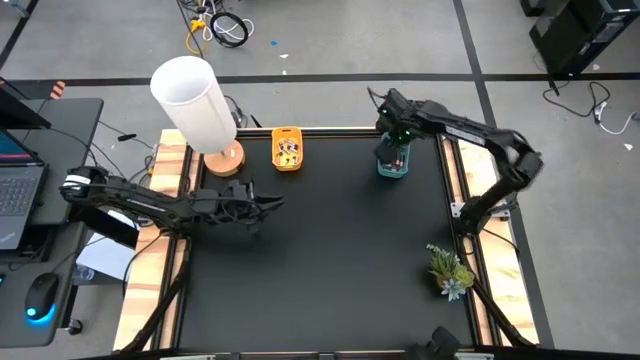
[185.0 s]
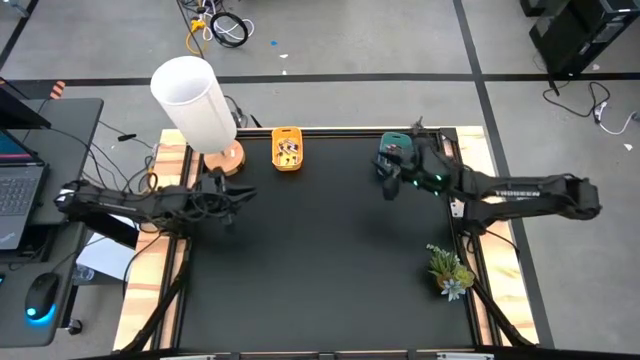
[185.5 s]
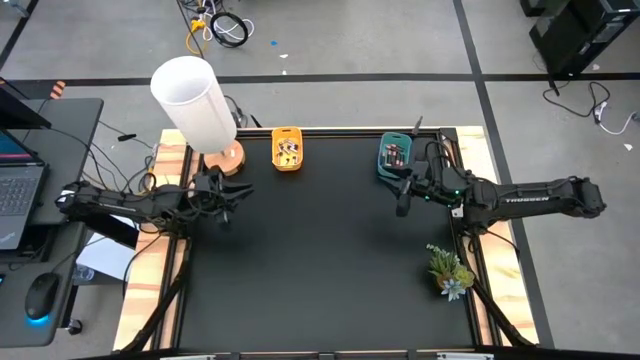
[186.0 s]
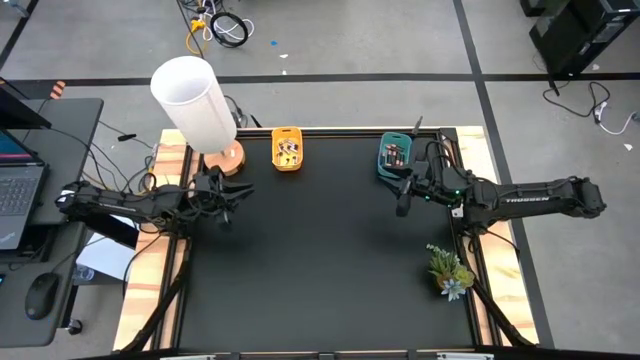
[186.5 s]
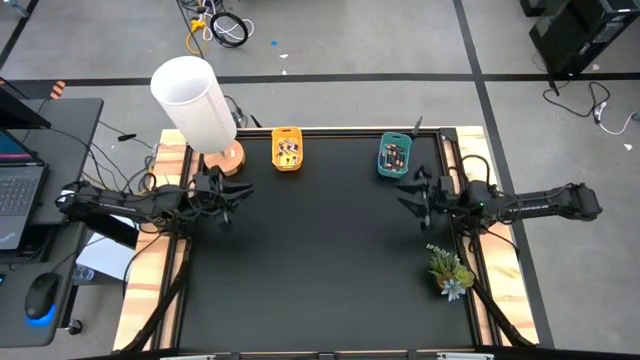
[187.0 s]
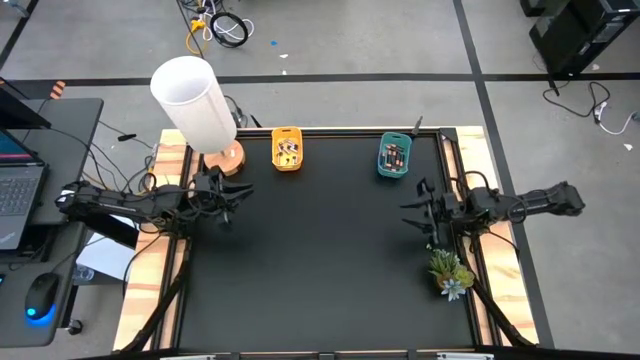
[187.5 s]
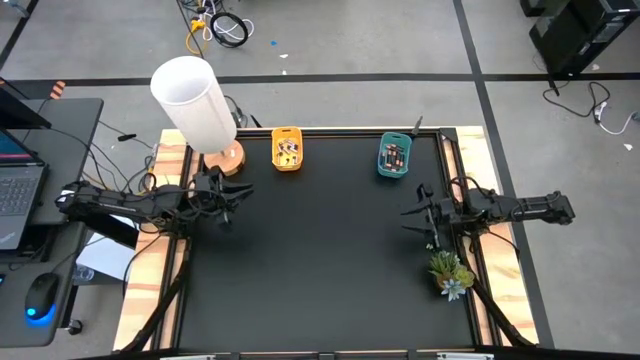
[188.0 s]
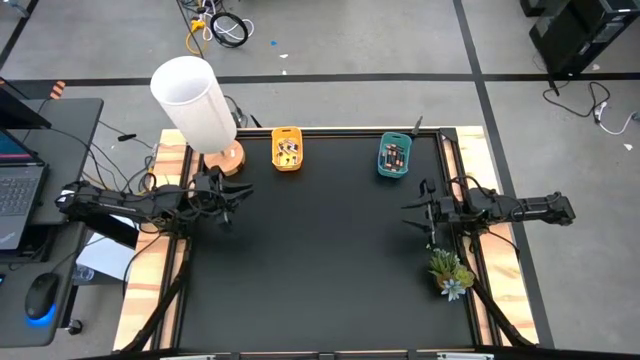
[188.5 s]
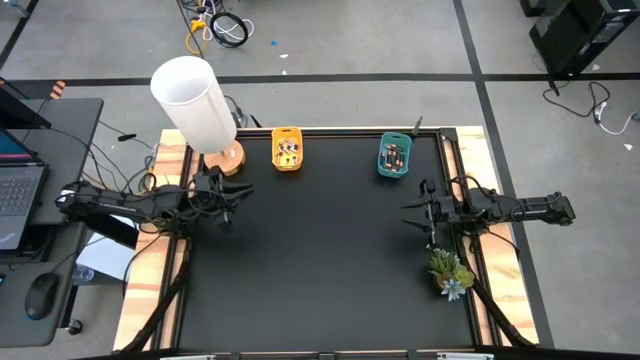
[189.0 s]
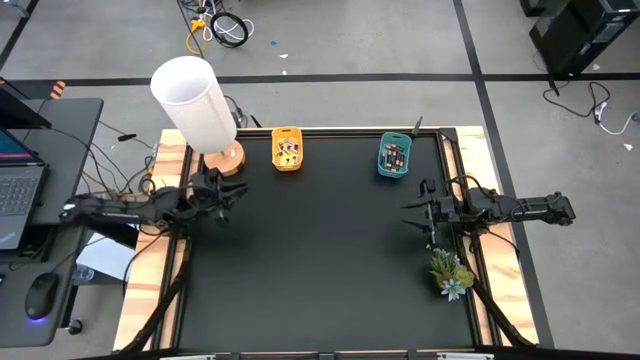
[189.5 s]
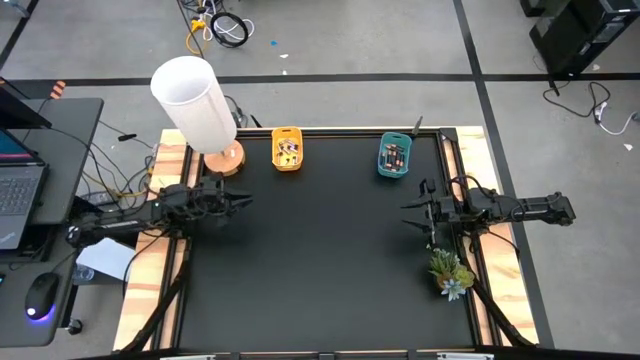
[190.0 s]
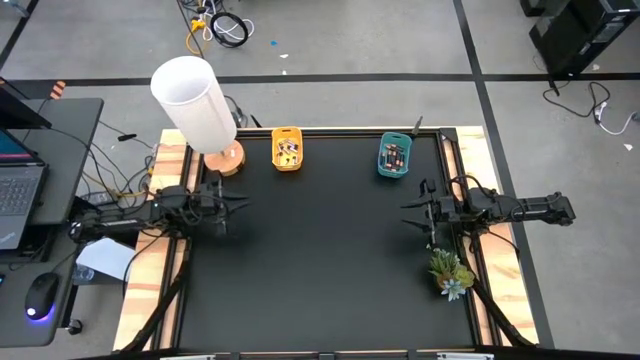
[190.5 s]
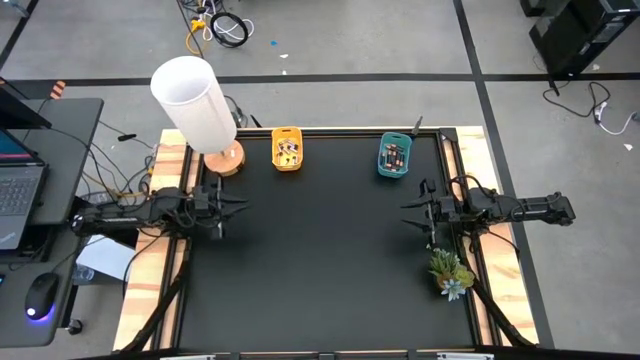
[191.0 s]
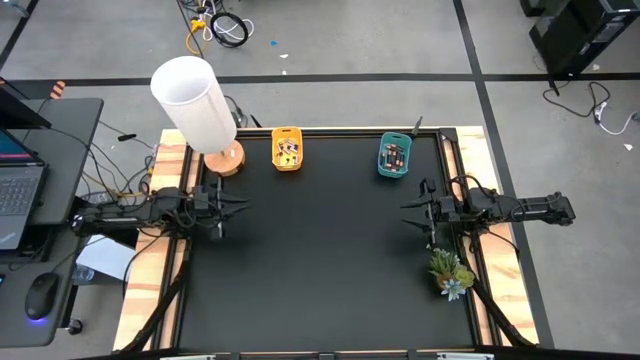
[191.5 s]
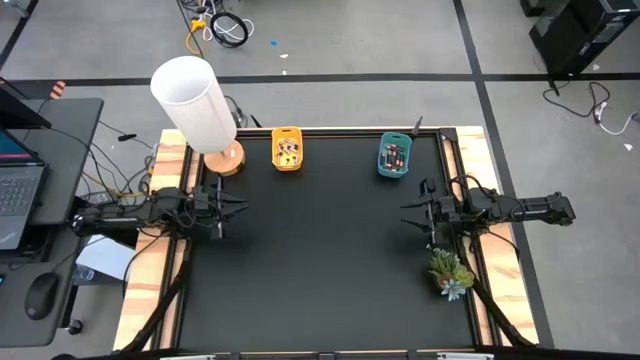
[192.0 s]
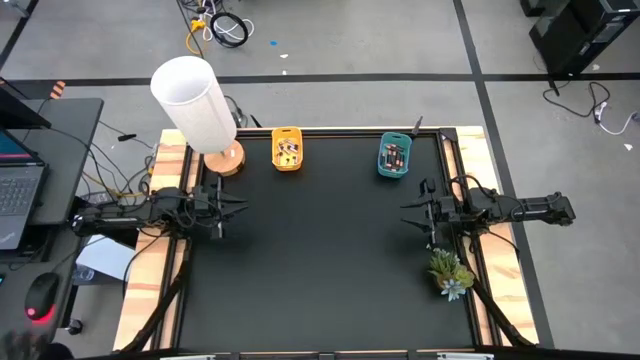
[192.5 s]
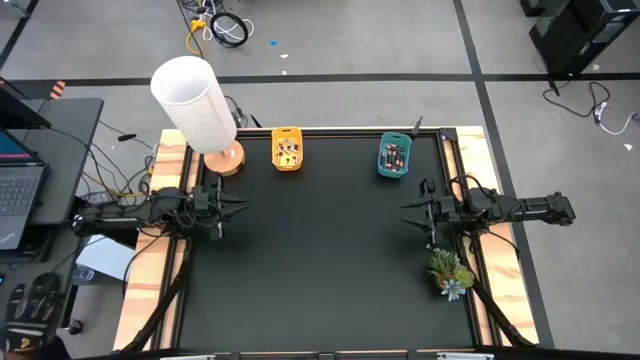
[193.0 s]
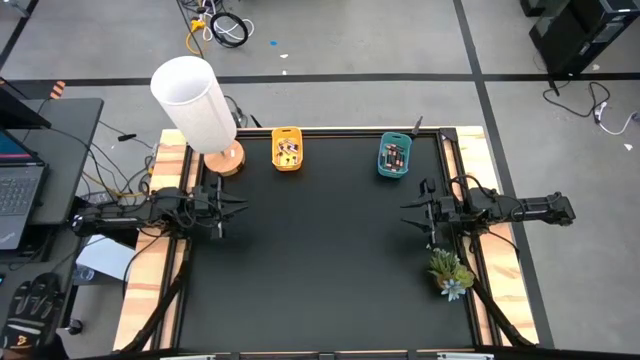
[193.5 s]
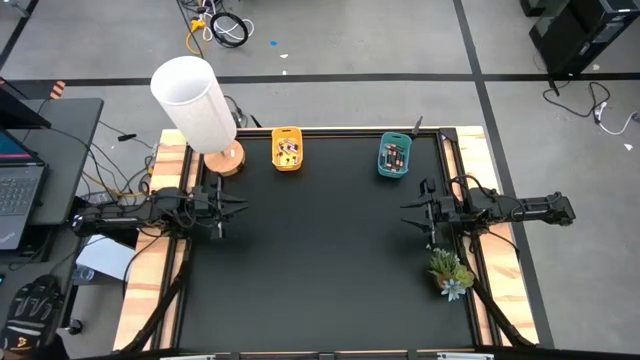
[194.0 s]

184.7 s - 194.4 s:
Task: Sort batteries
Return to Home Position

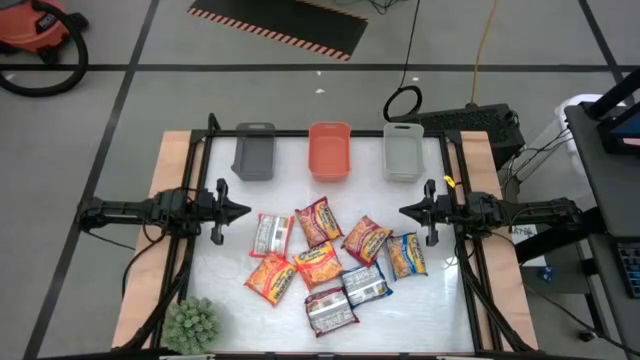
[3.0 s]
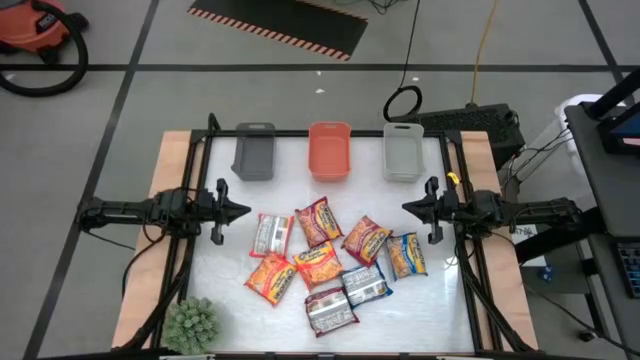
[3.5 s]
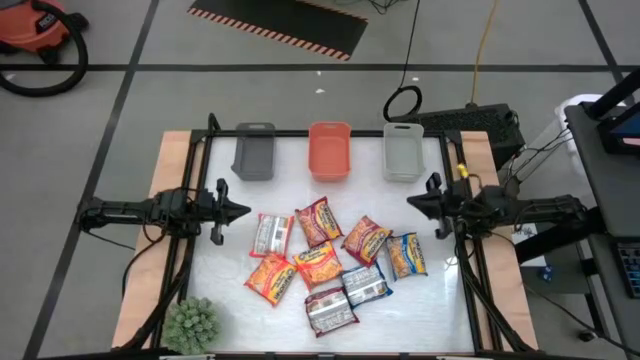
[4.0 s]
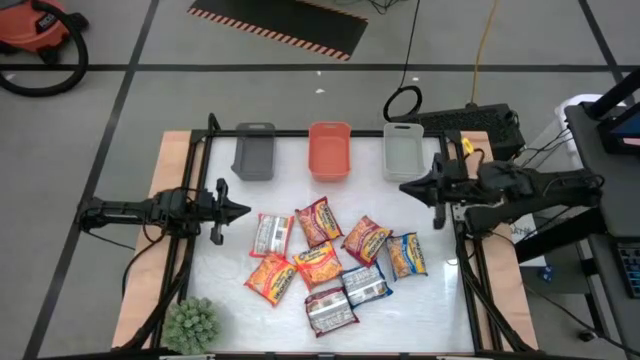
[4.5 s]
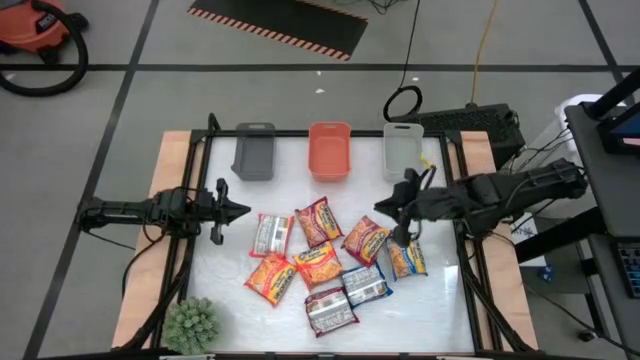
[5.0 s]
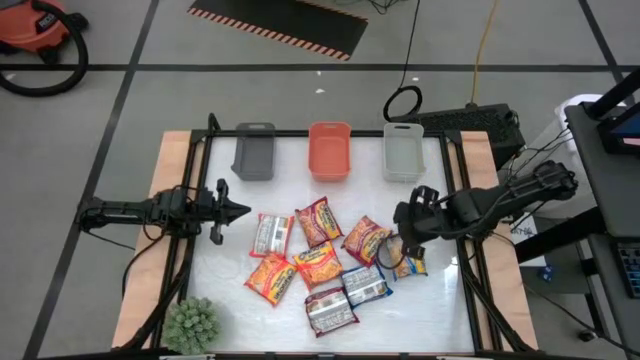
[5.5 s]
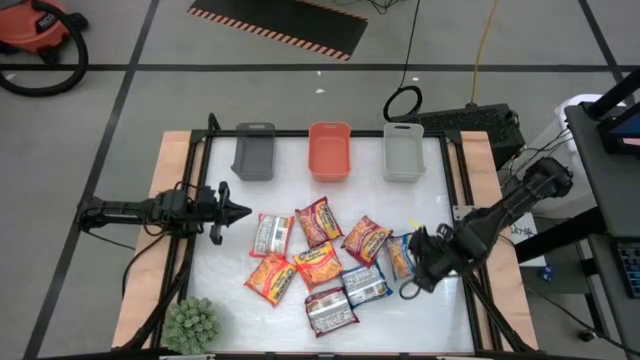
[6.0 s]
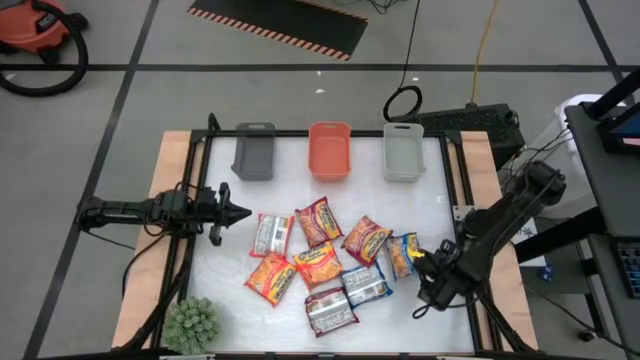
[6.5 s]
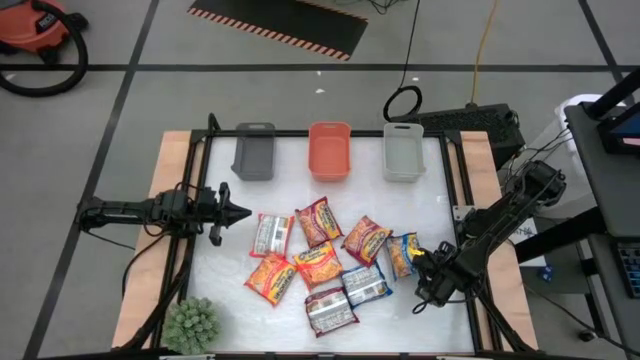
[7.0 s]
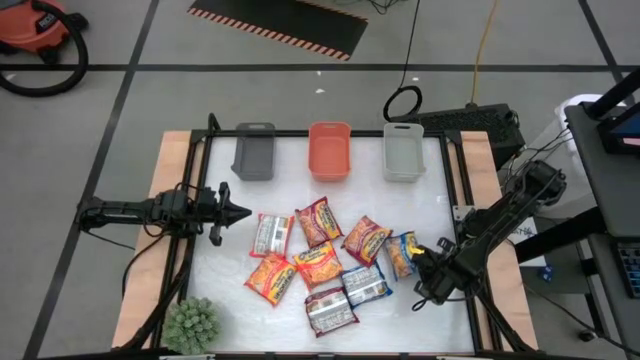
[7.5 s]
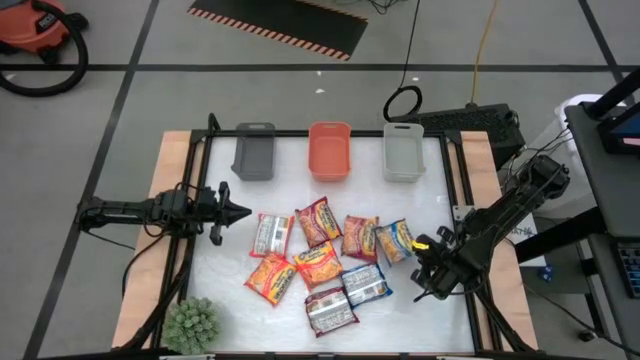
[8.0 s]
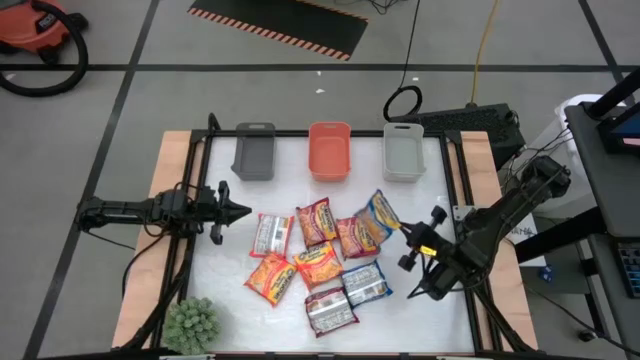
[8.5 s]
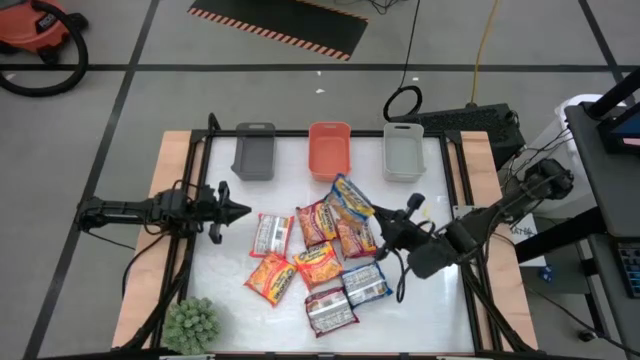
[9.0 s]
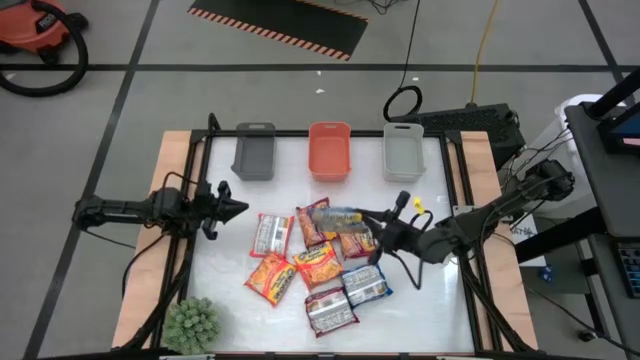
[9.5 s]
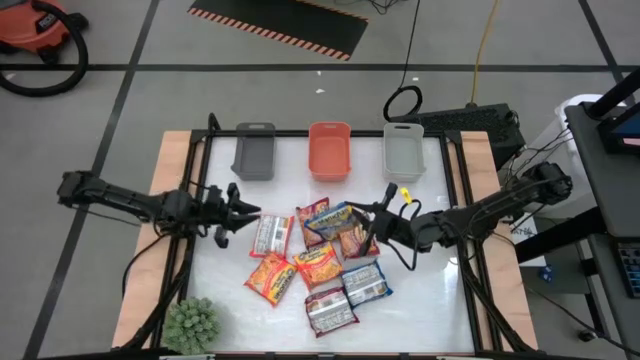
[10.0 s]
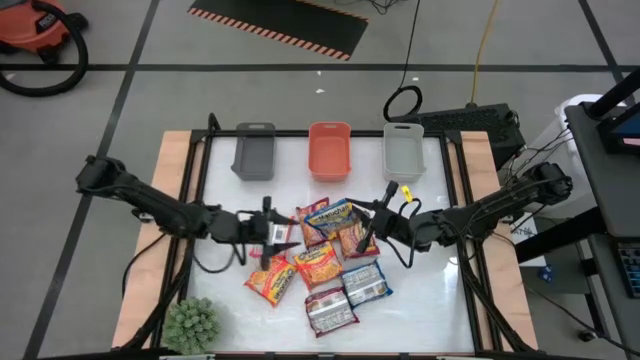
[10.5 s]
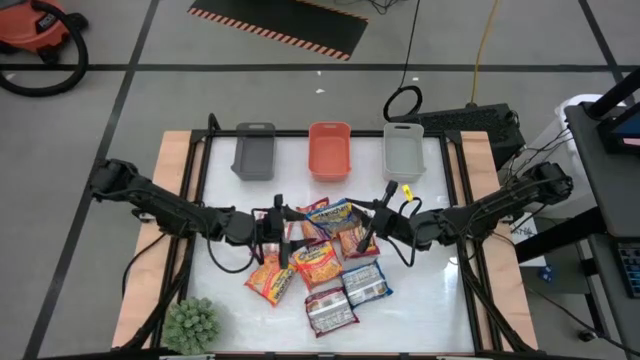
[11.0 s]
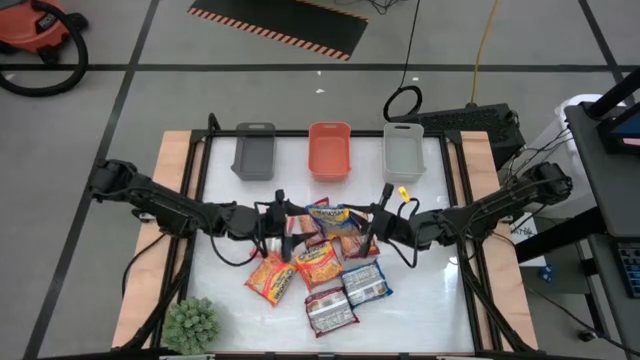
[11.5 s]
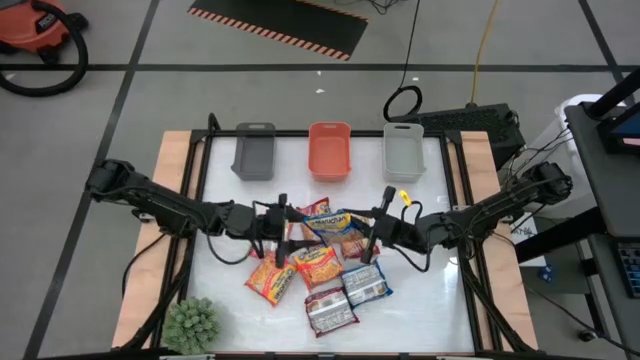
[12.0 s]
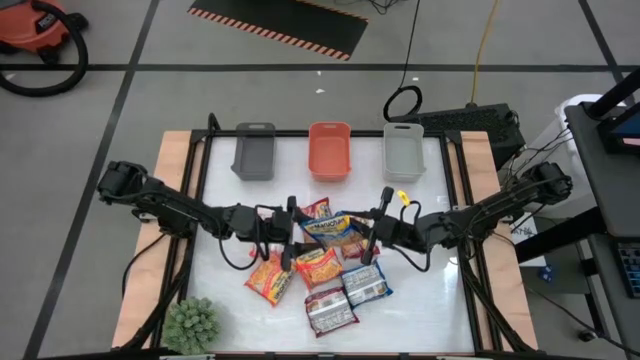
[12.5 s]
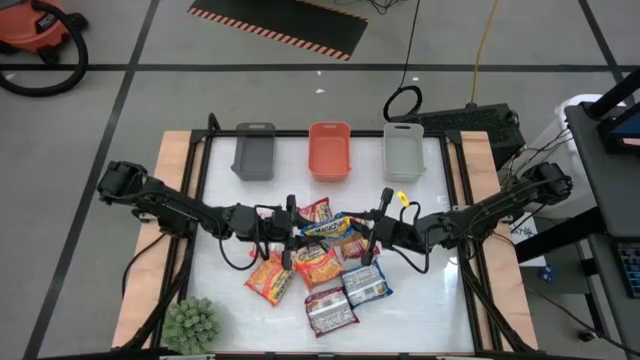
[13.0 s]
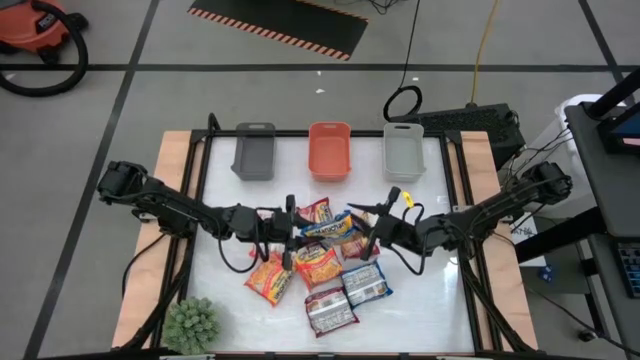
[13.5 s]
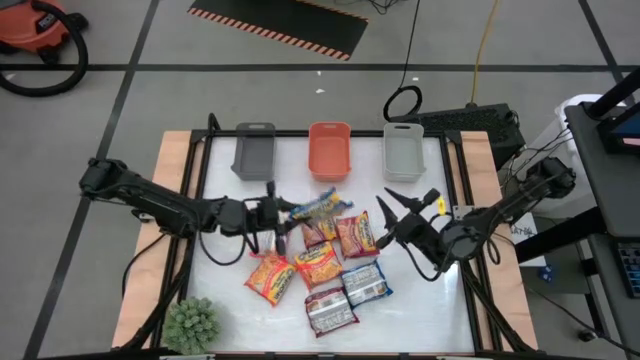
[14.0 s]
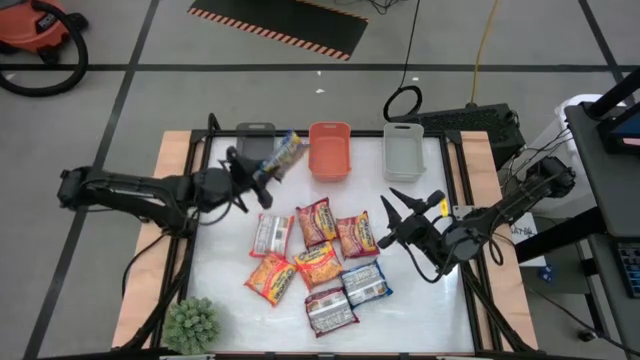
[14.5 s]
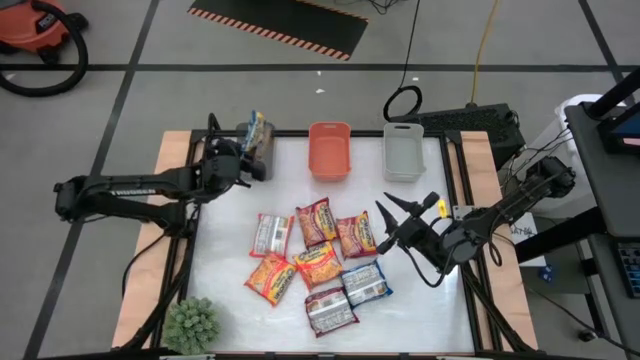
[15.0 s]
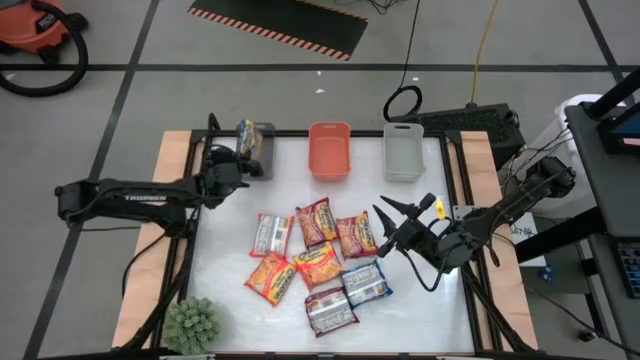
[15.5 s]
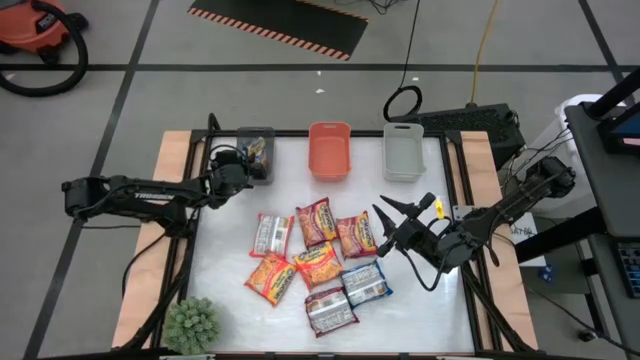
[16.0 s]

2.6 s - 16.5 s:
Task: Sort Maruchan noodles
Put the right blue noodle pack into the black bin
